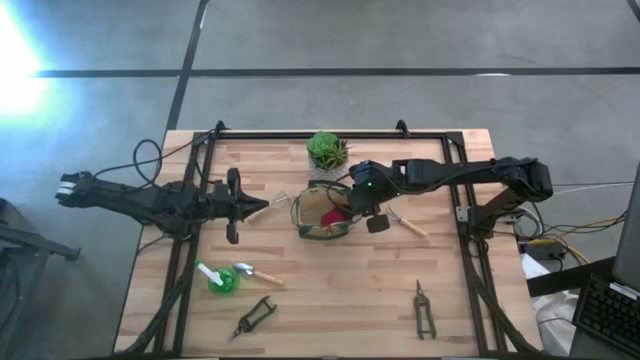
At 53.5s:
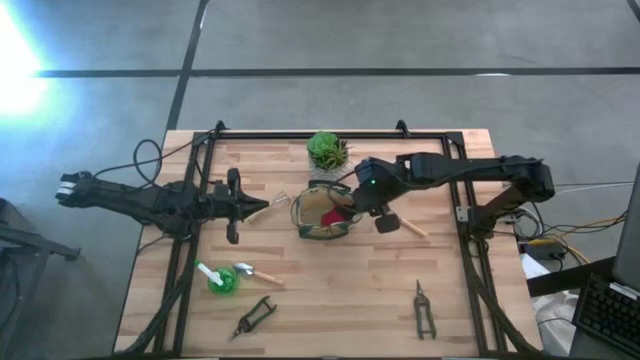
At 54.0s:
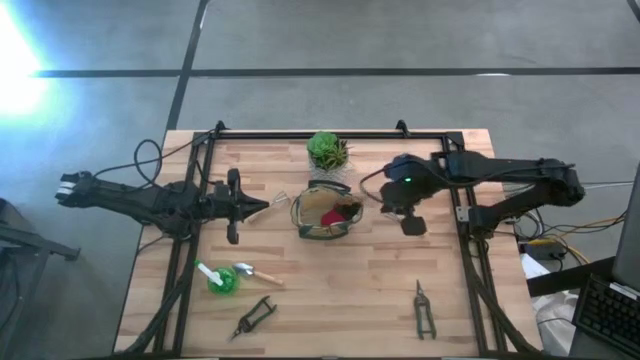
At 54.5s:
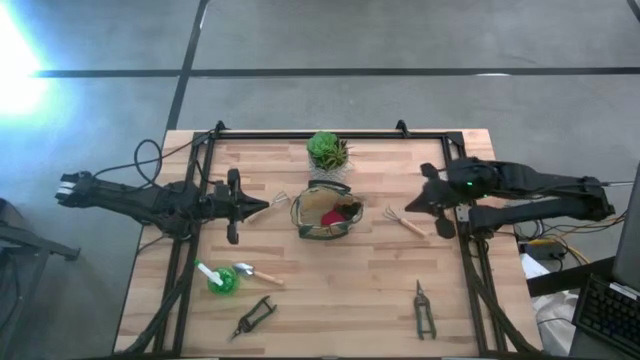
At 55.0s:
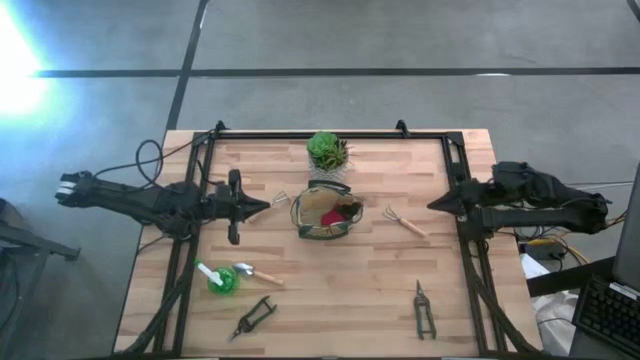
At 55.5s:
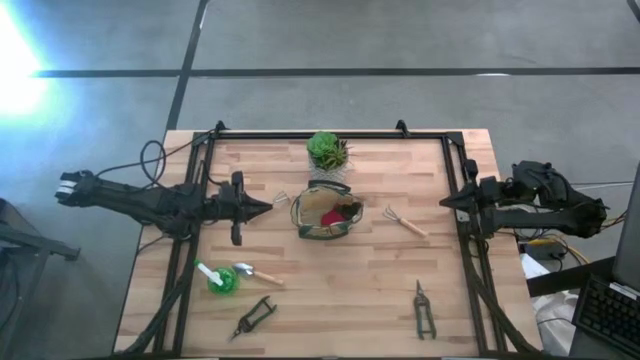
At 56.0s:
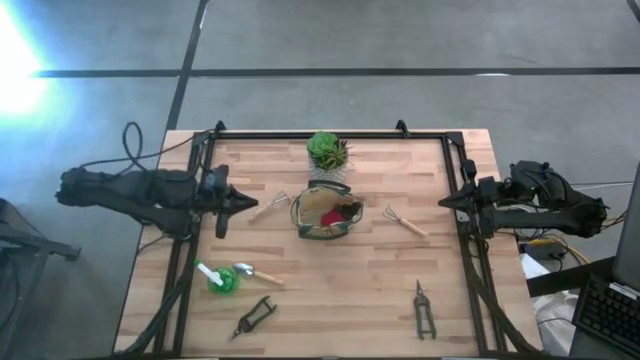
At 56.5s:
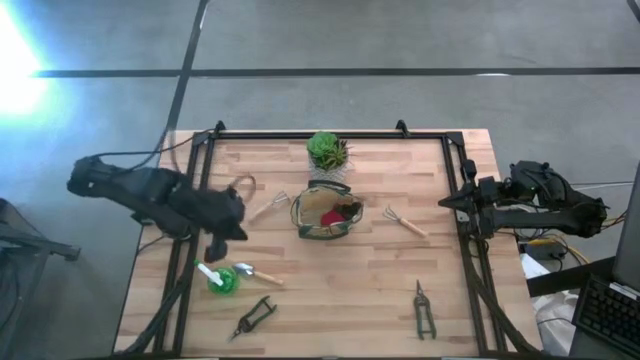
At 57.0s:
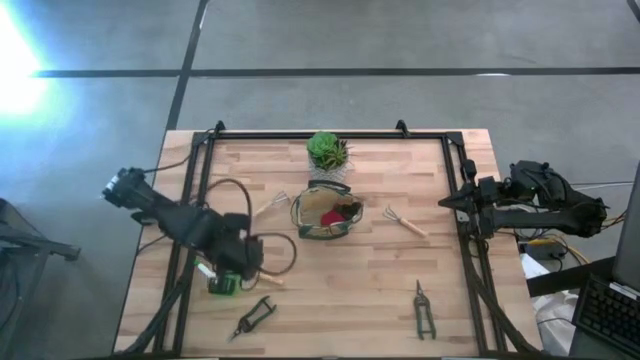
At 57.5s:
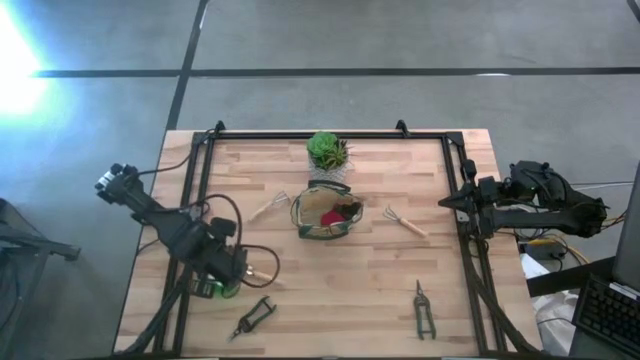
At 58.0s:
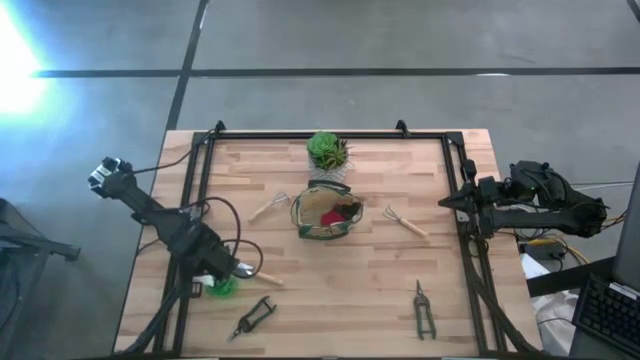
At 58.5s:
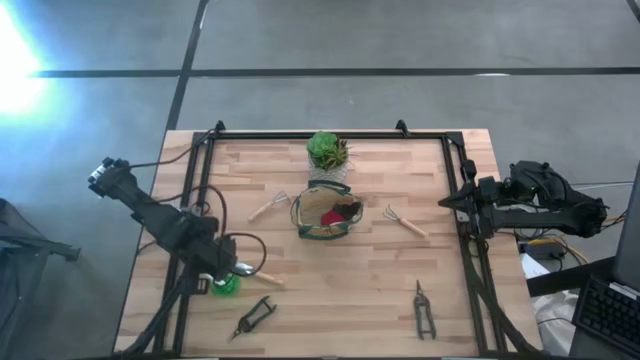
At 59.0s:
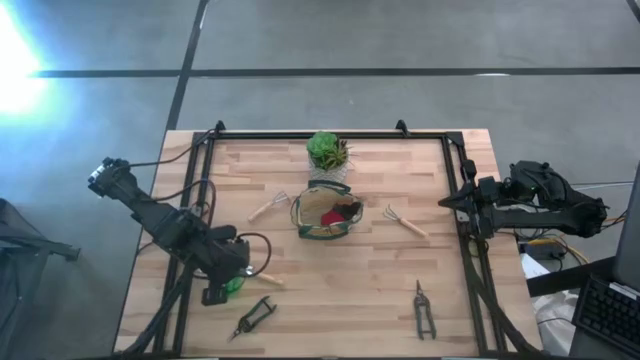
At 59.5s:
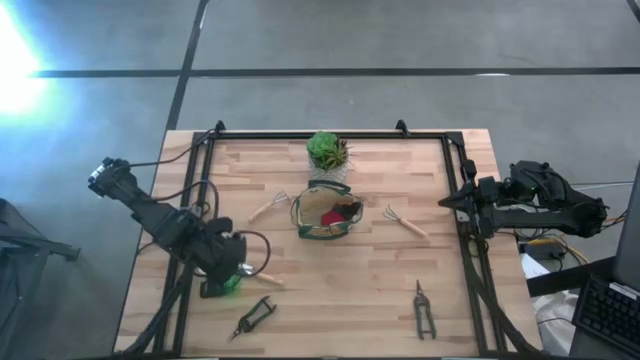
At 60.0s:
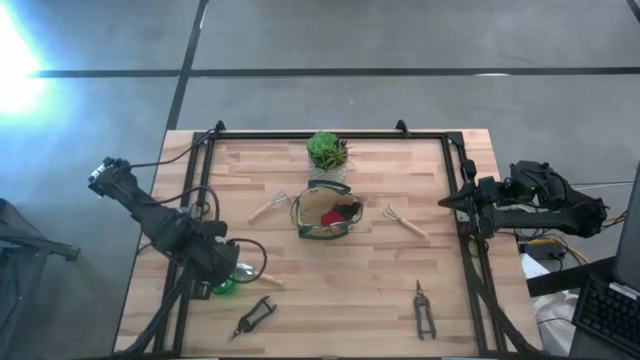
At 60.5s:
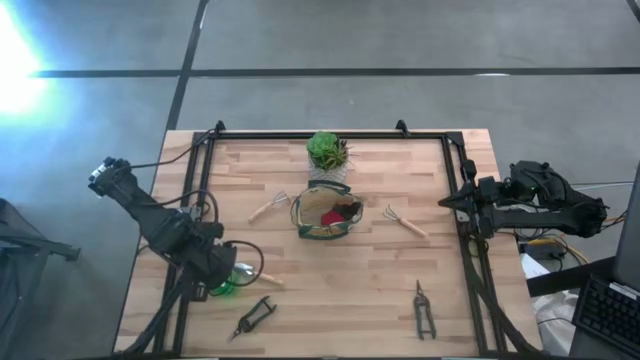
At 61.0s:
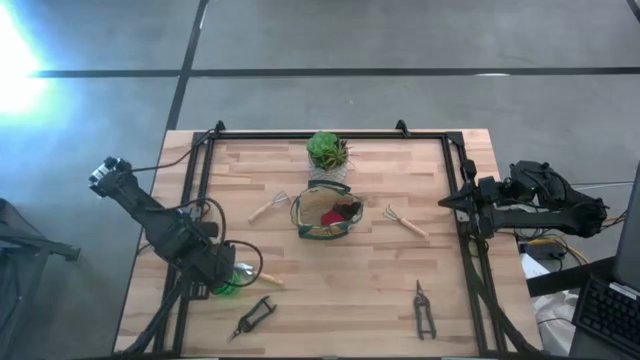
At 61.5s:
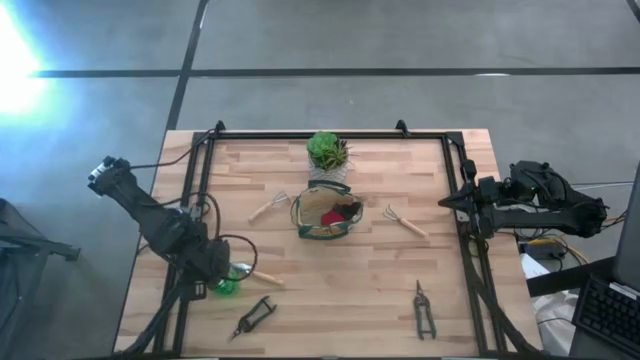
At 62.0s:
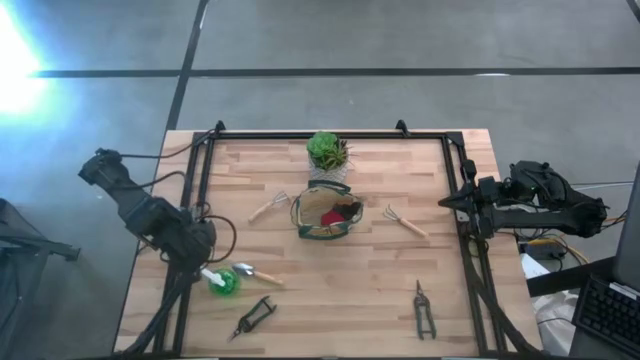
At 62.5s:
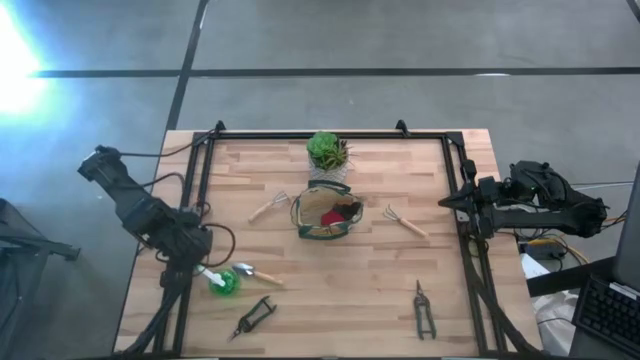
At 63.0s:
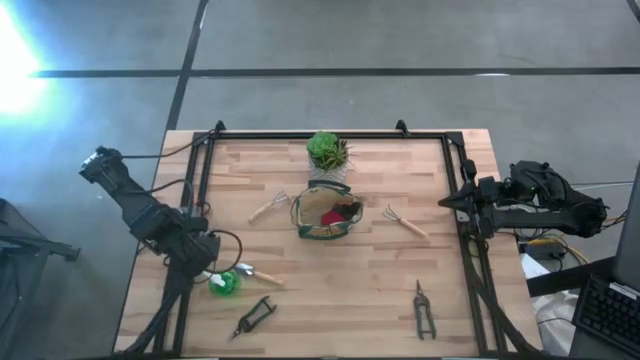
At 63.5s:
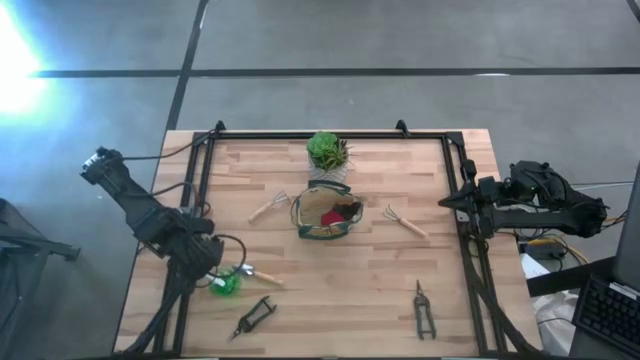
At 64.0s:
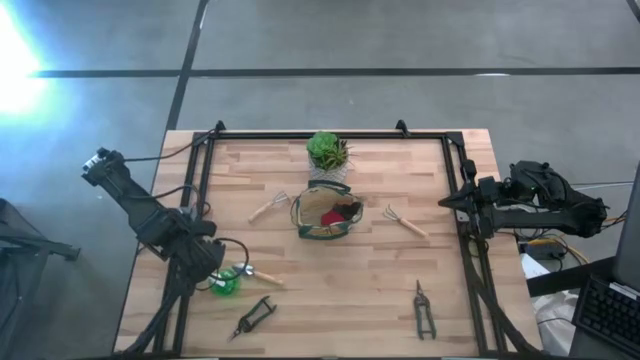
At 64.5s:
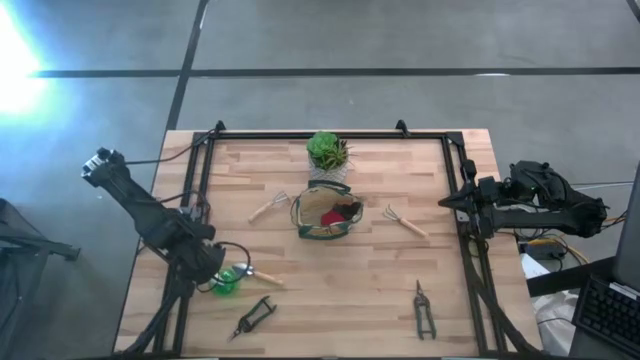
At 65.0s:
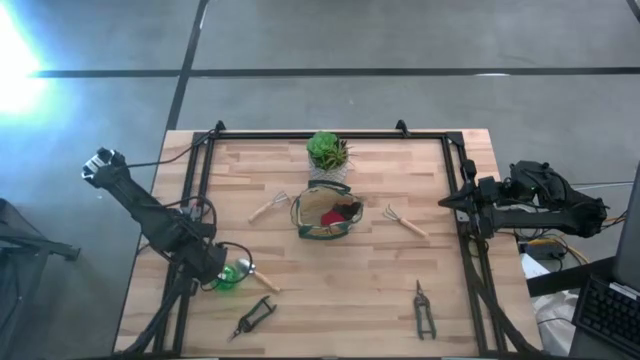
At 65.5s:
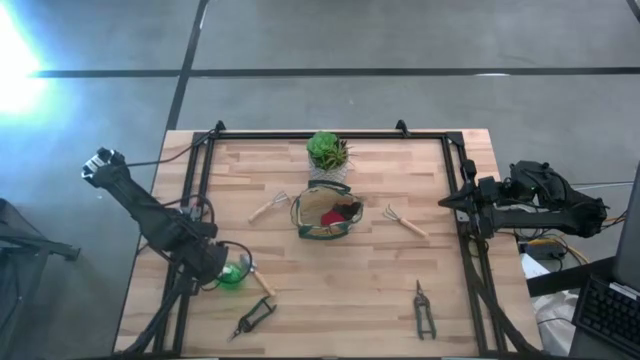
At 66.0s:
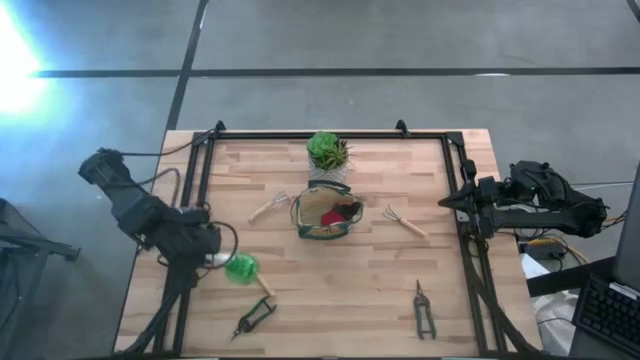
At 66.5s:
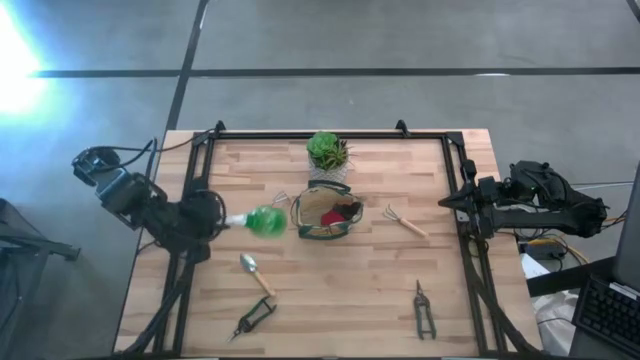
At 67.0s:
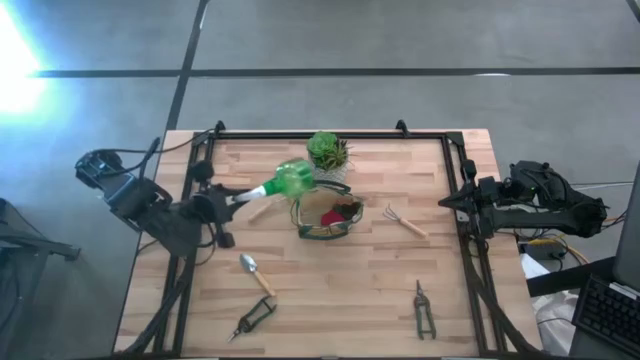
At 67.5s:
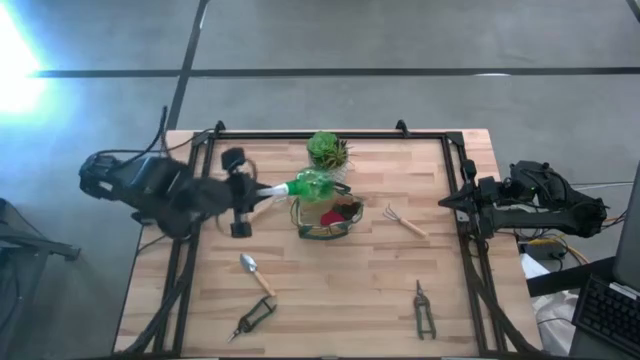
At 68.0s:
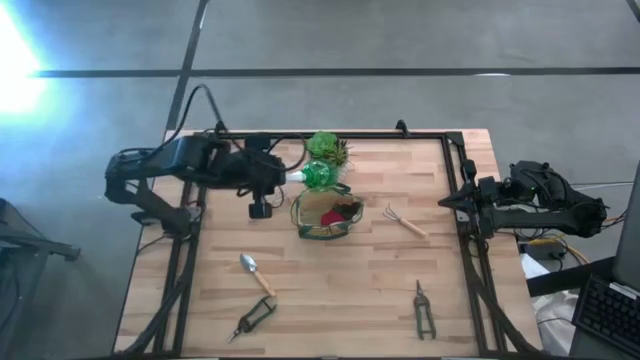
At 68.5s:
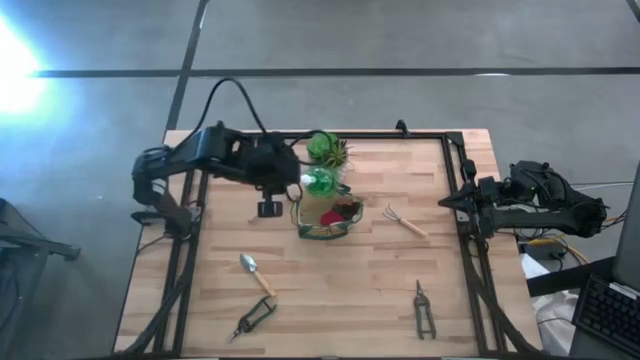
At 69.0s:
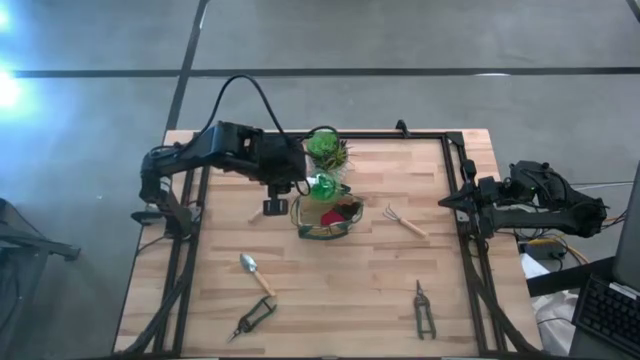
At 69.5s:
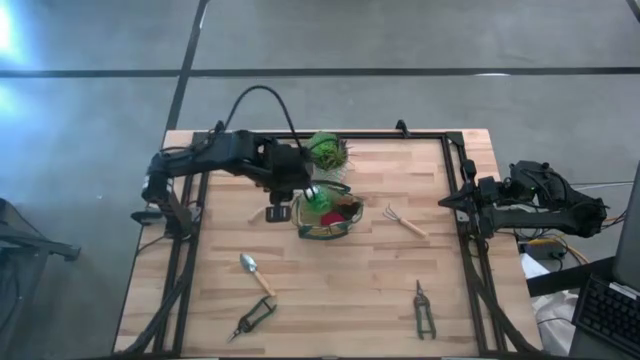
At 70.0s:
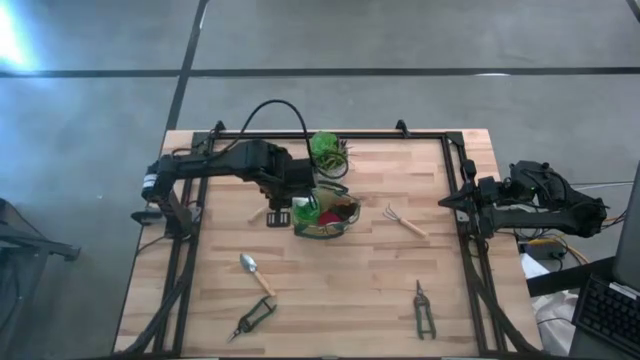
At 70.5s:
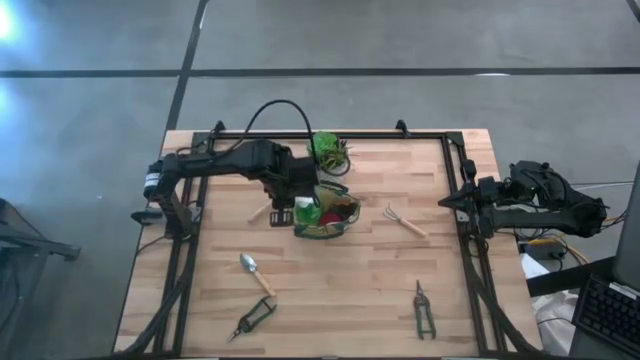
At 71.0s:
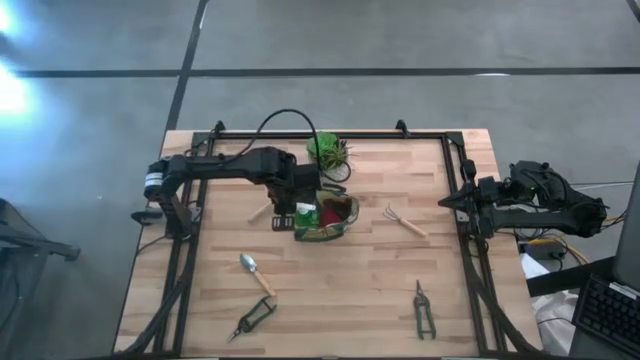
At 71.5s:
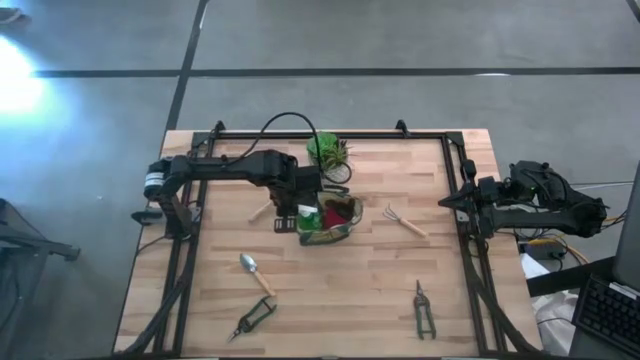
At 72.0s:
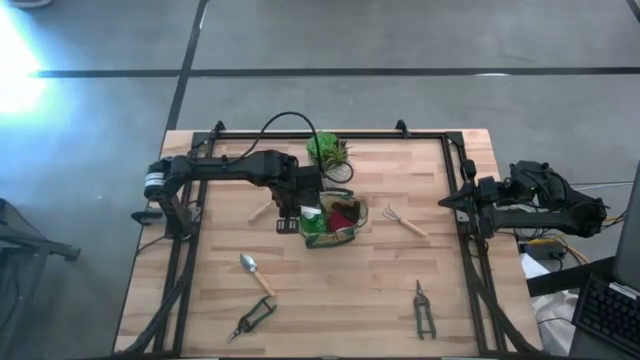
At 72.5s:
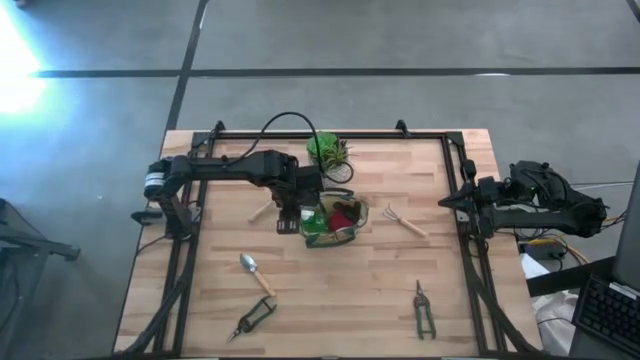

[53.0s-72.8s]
Task: Pick & Place Garden tools in Gardening bag
Put the green spray bottle into the gardening bag

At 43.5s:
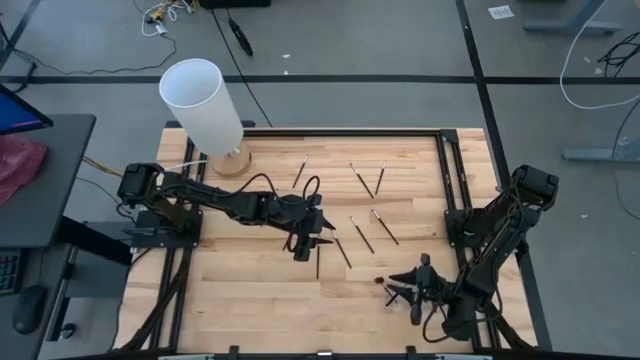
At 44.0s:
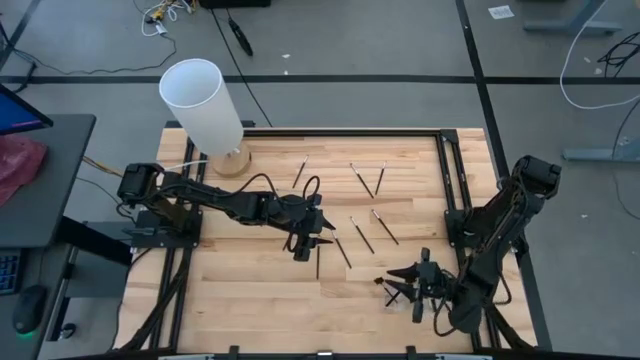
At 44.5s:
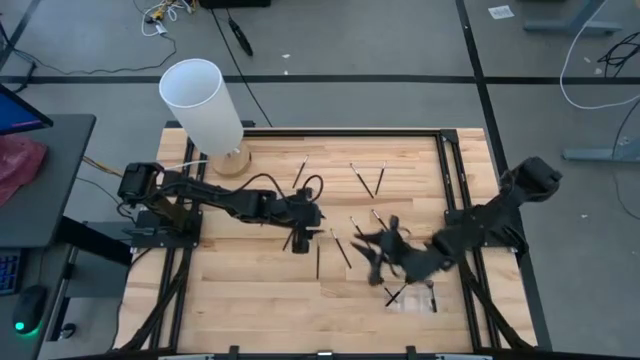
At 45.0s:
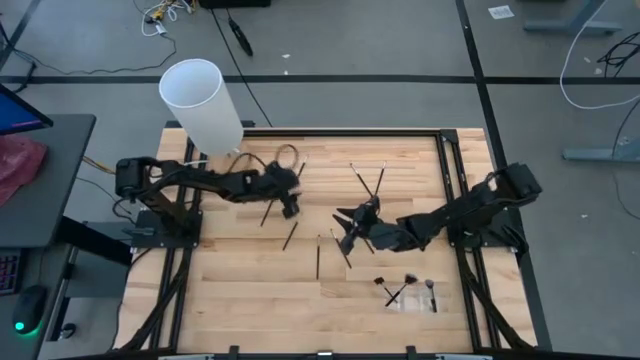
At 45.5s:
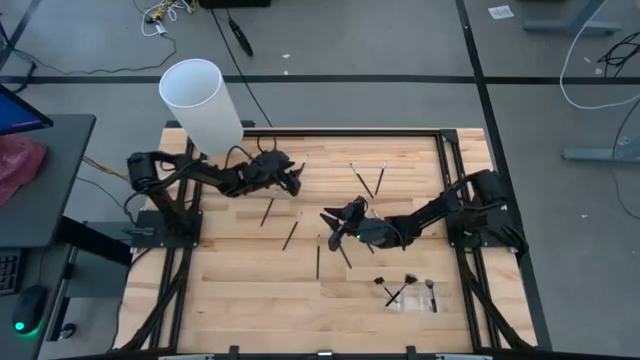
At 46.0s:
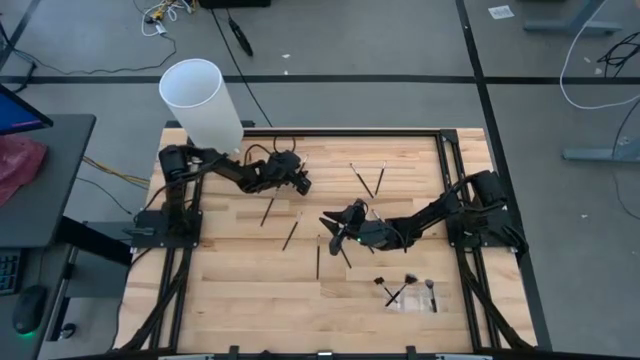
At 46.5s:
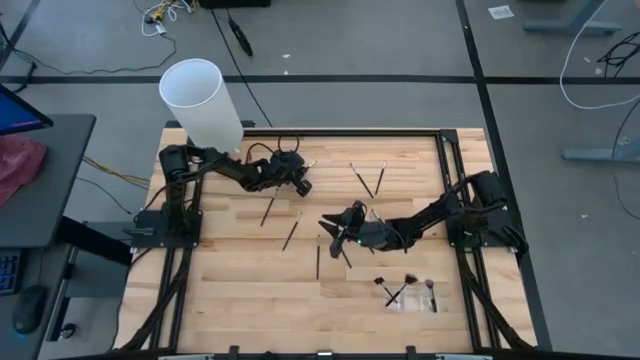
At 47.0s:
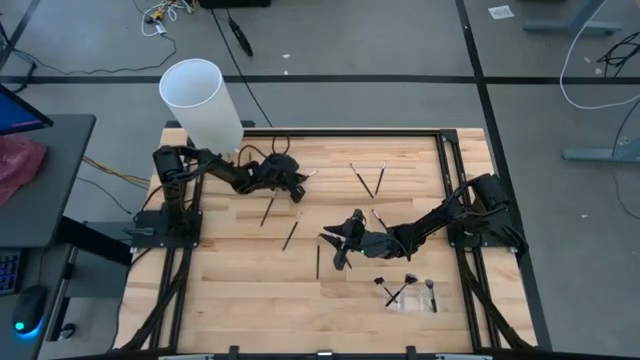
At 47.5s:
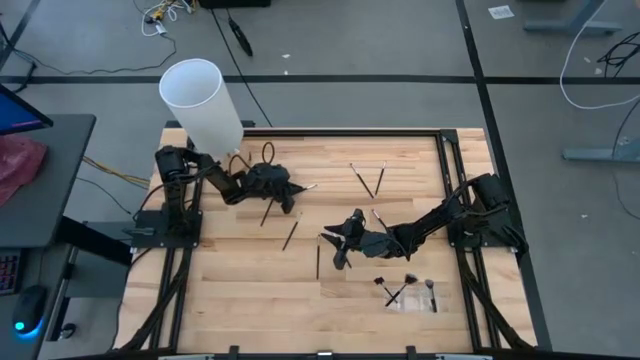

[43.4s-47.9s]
Task: Pick & Place Makeup Supplies
Put the silver makeup brush into the transparent organizer
